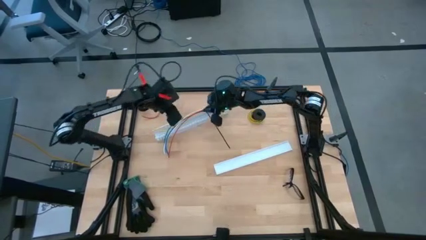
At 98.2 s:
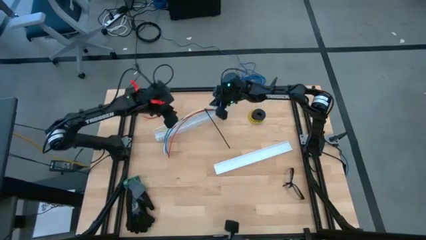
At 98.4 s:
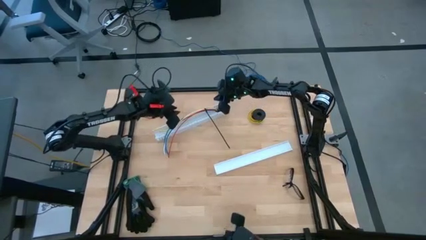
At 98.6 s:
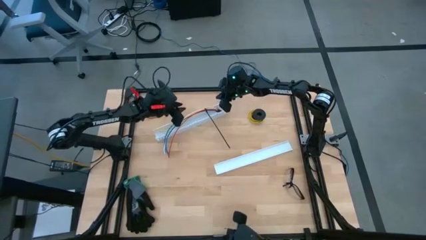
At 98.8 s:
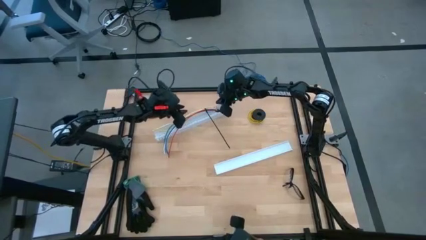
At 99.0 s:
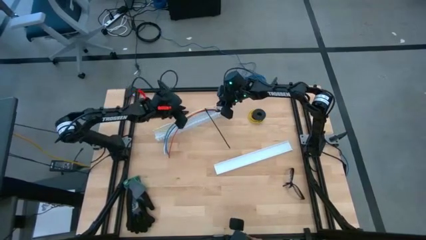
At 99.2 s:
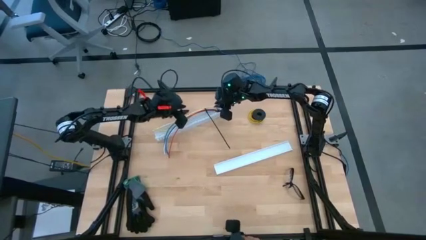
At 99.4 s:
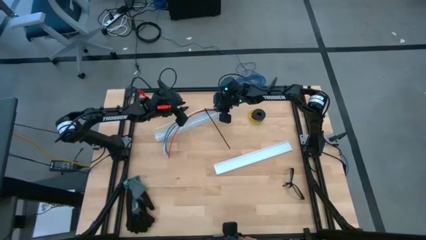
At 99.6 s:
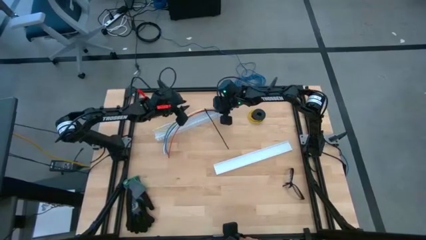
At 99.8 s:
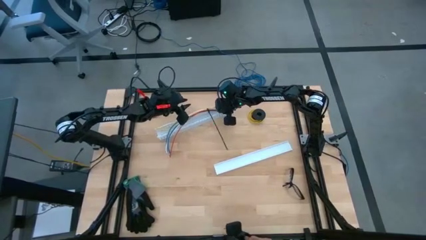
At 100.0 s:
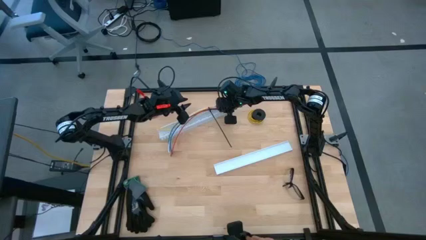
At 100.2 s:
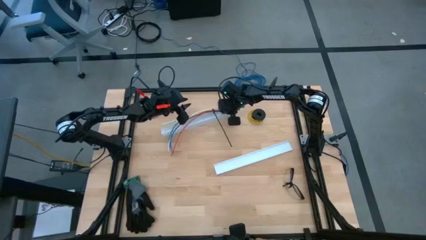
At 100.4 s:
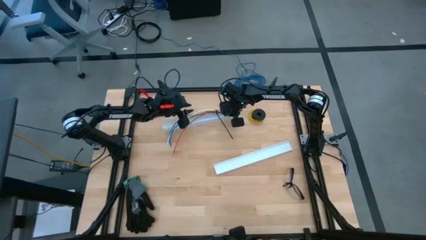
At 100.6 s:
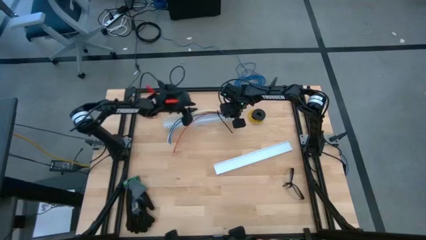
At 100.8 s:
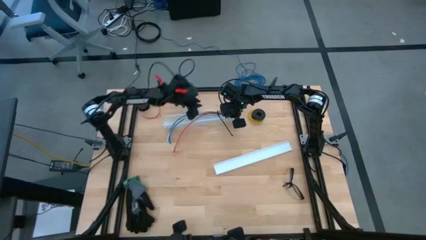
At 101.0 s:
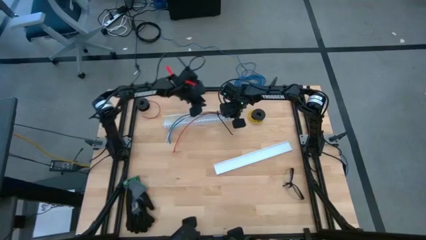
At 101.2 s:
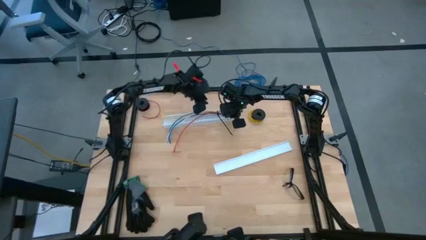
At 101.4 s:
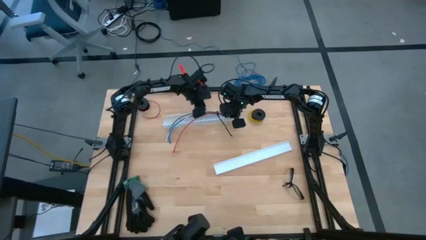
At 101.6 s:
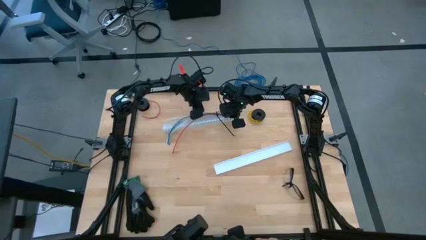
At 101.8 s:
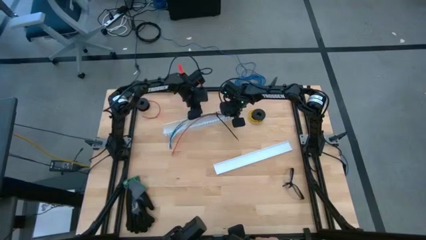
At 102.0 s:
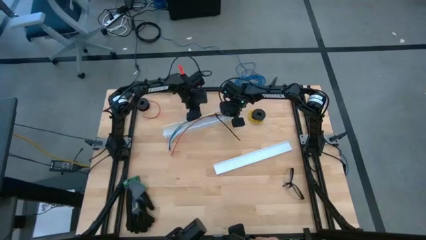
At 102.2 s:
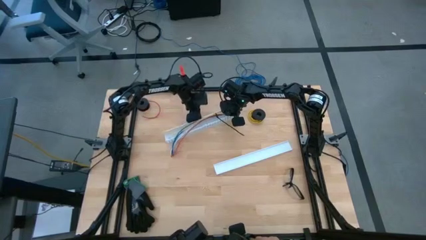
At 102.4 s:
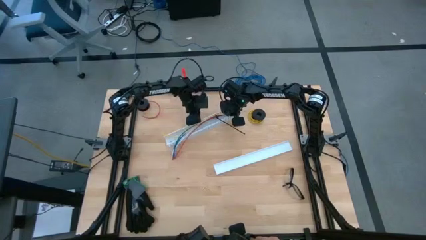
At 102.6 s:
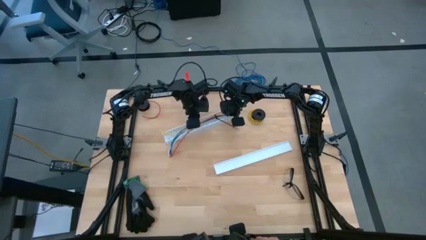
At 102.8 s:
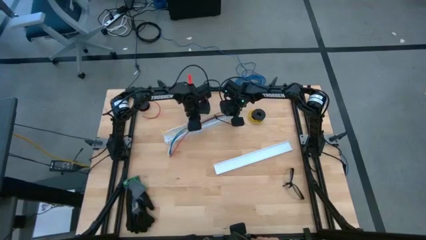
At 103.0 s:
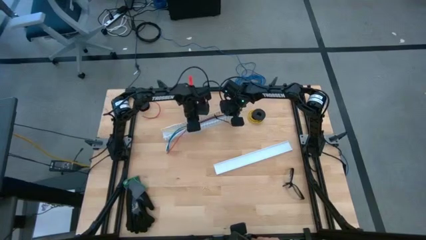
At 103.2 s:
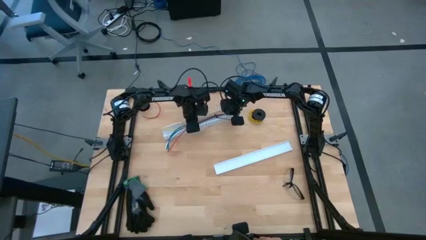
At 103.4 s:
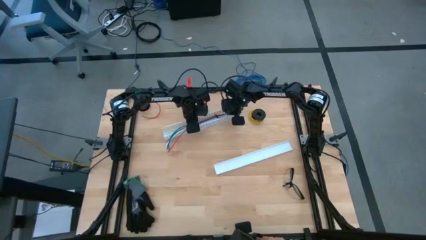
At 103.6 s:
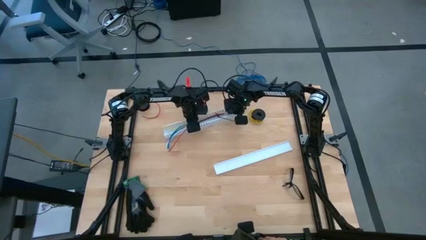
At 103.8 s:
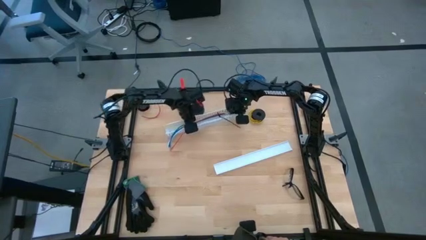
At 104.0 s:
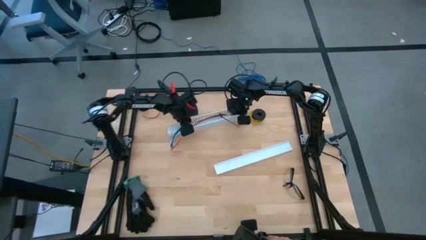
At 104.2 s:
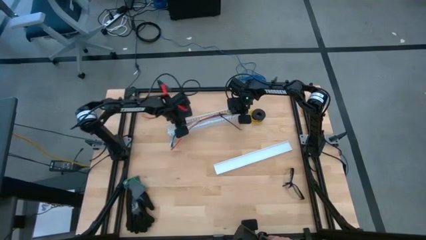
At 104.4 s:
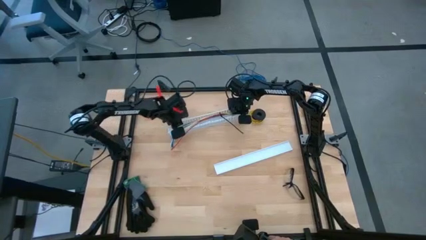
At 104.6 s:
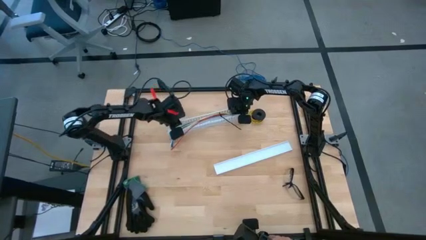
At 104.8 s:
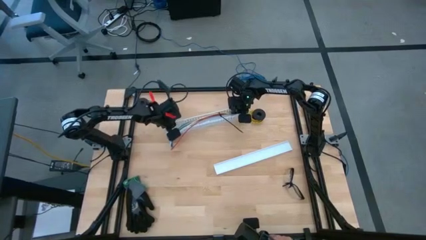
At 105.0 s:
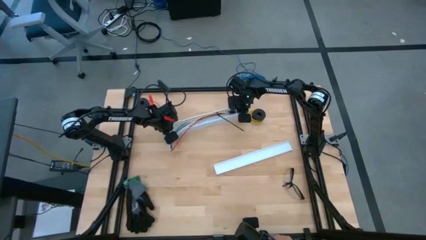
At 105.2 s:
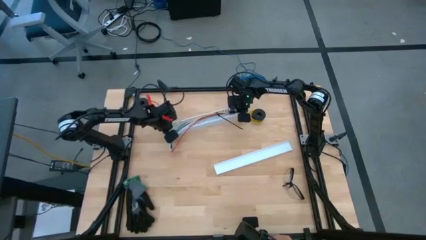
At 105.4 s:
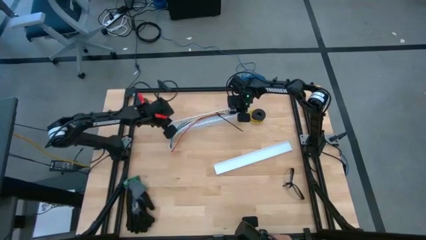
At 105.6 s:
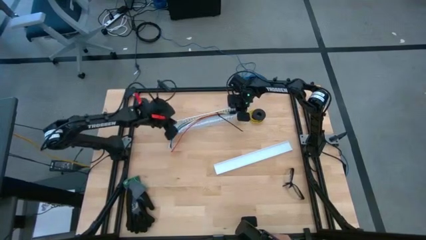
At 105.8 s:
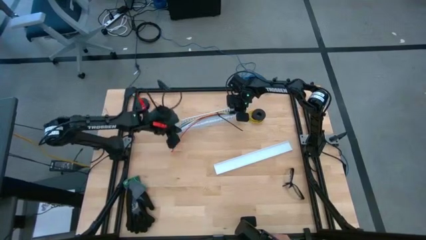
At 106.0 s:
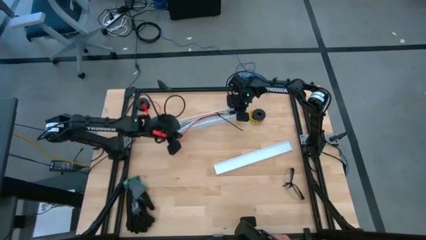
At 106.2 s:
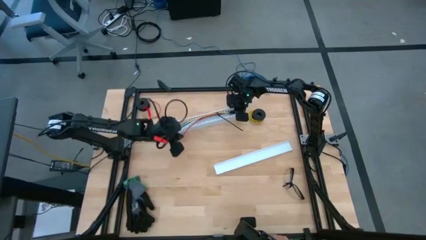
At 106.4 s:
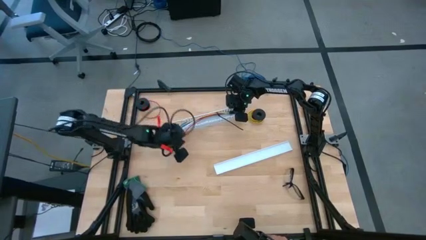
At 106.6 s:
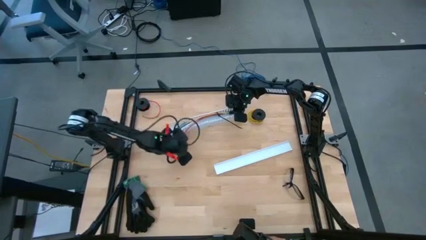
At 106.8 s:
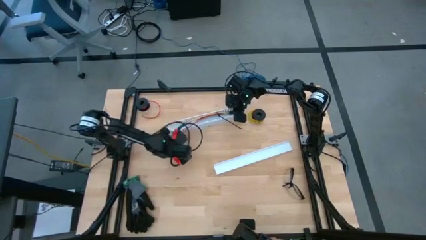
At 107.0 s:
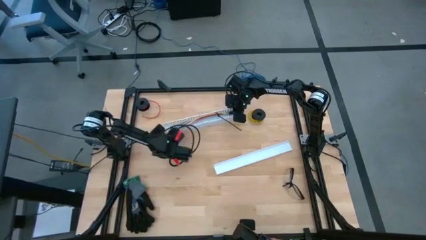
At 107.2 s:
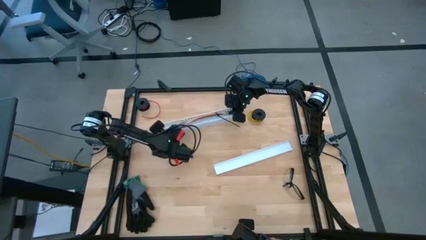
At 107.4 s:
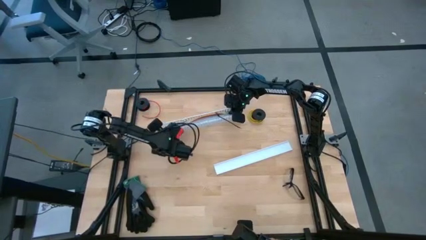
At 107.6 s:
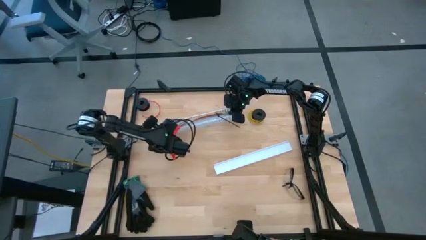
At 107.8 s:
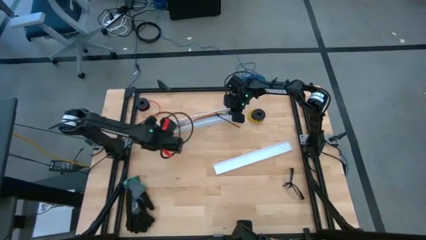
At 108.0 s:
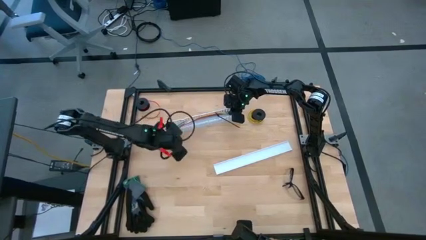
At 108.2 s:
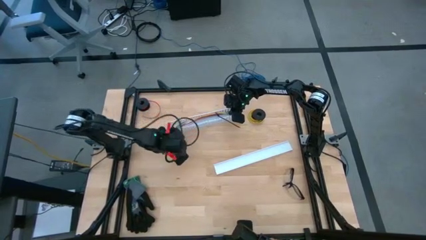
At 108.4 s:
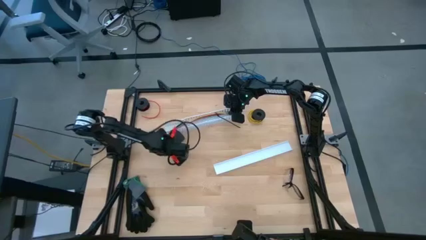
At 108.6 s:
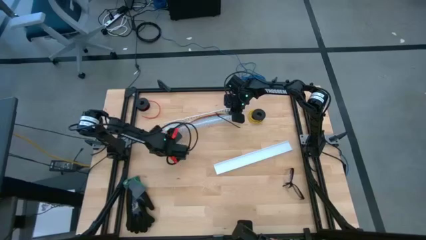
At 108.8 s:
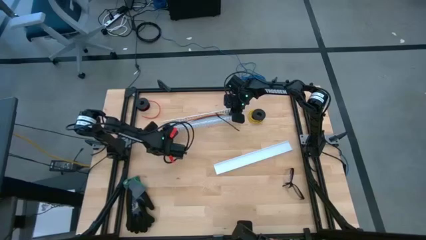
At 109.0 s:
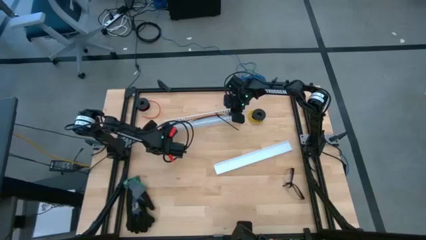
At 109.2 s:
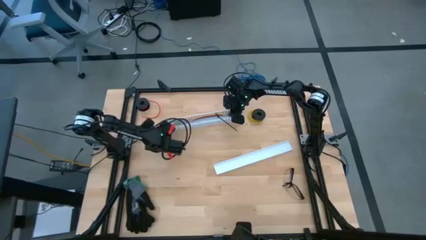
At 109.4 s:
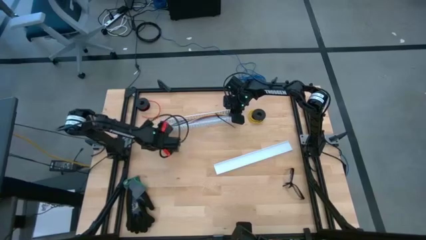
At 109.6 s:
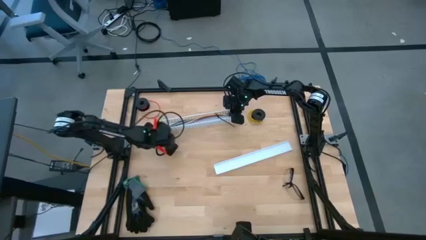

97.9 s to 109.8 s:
Task: Ziptie cables
Put the ziptied cables in the white cable duct
